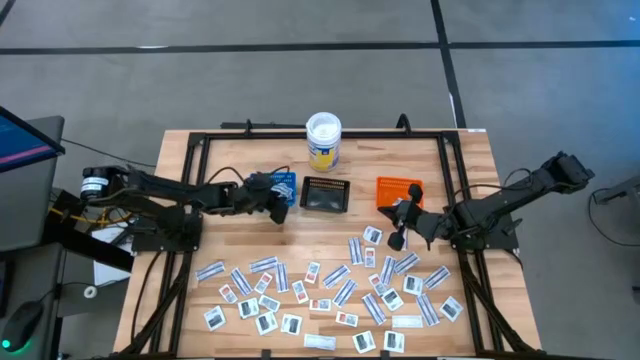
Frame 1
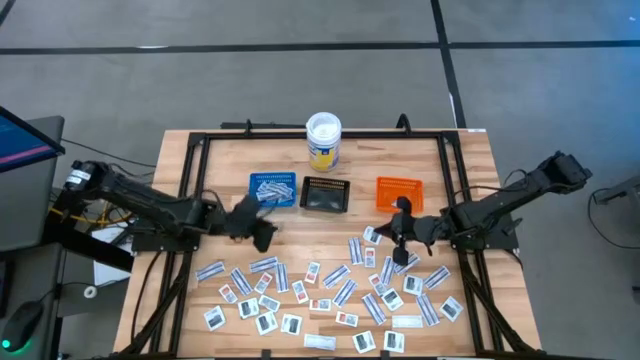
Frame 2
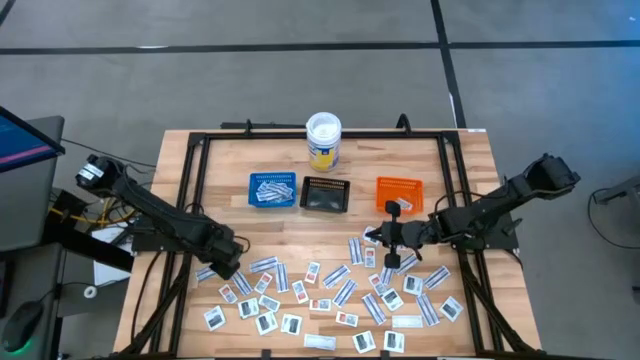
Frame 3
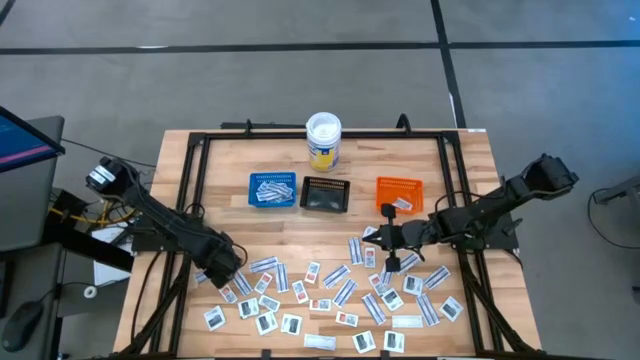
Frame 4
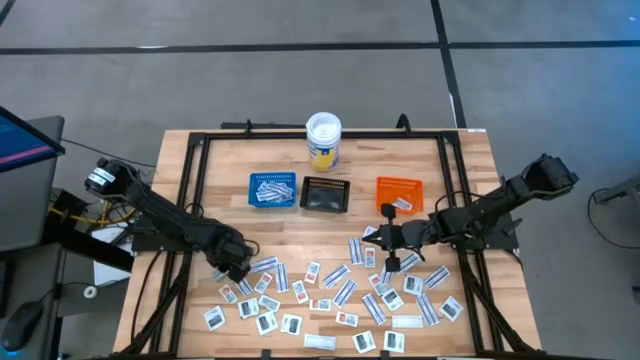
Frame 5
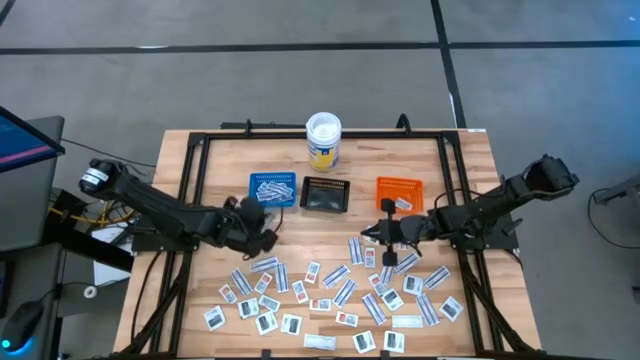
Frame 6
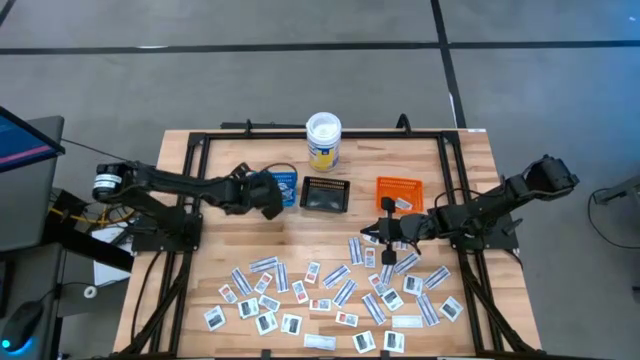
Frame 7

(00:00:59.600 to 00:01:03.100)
Task: Pick & Place First Aid Supplies
Put the blue bandage into the blue bin

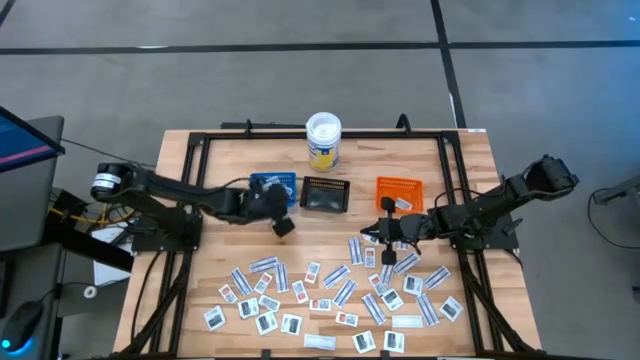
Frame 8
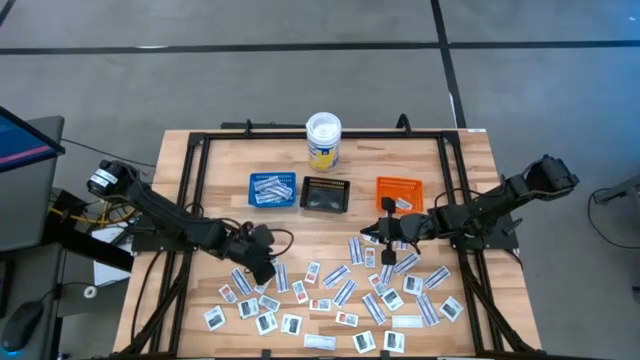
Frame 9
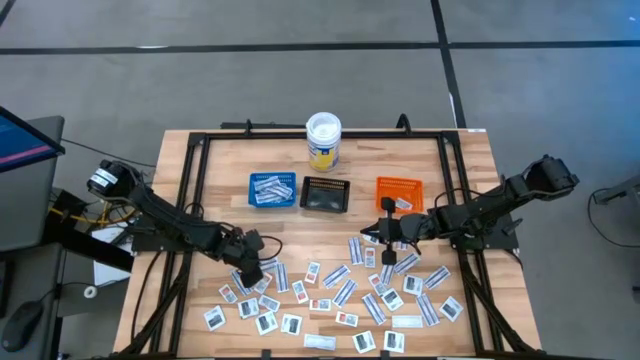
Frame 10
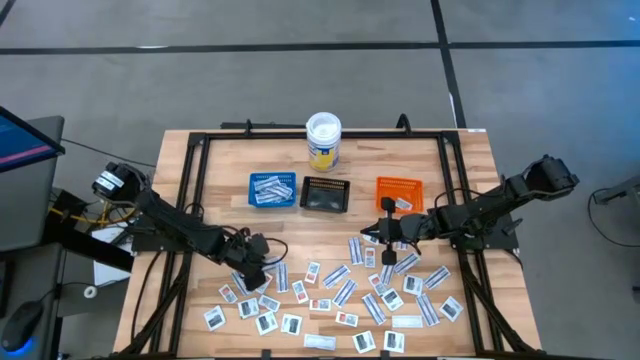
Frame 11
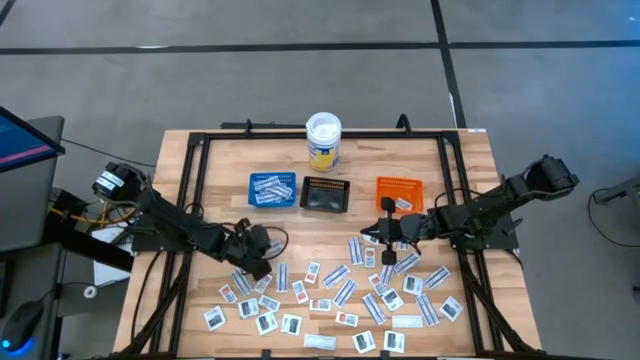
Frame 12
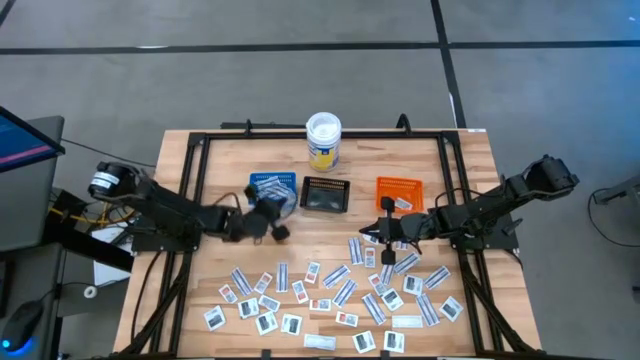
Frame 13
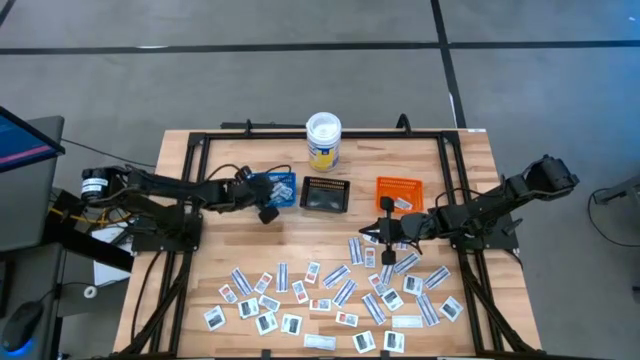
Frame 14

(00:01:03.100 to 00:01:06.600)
Put the blue bandage into the blue bin

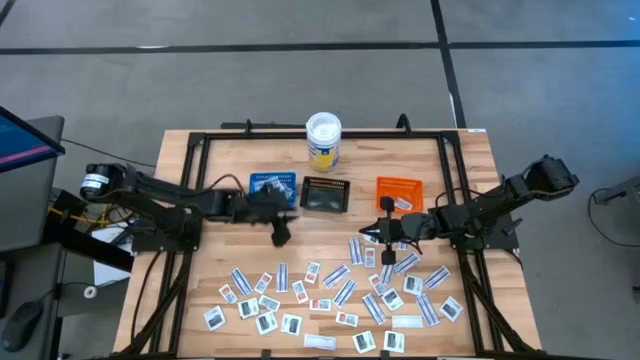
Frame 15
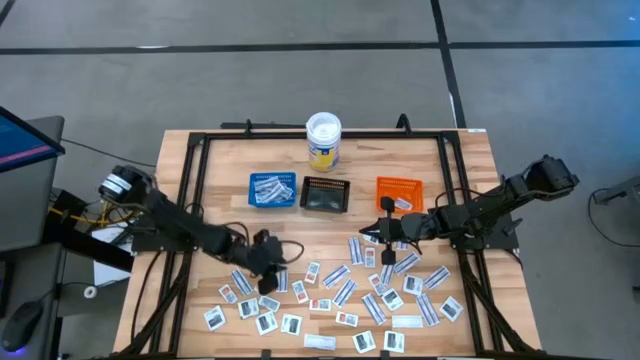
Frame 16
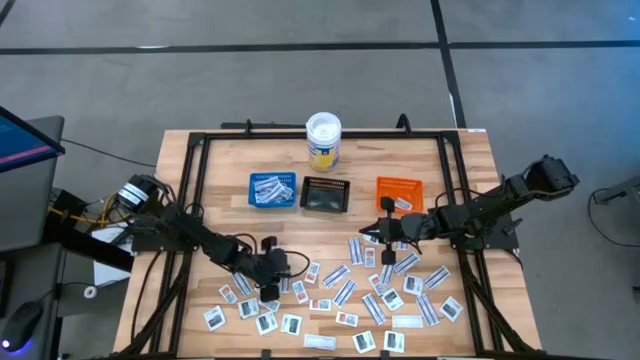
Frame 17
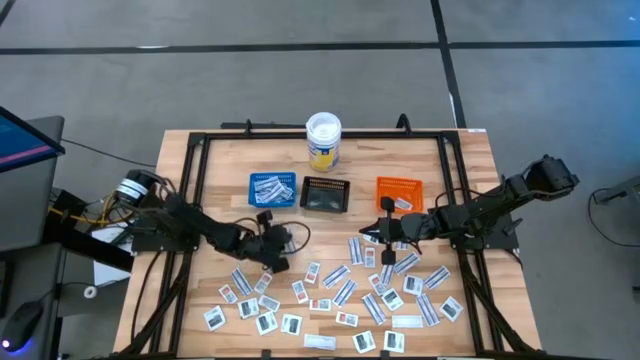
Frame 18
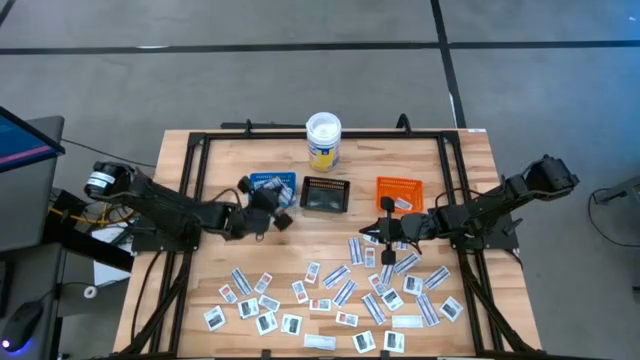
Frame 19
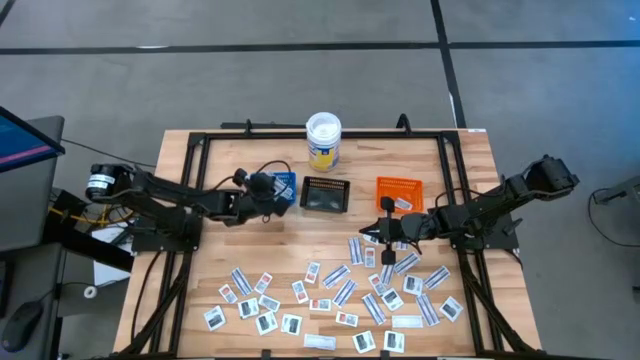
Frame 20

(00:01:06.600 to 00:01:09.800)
Put the blue bandage into the blue bin

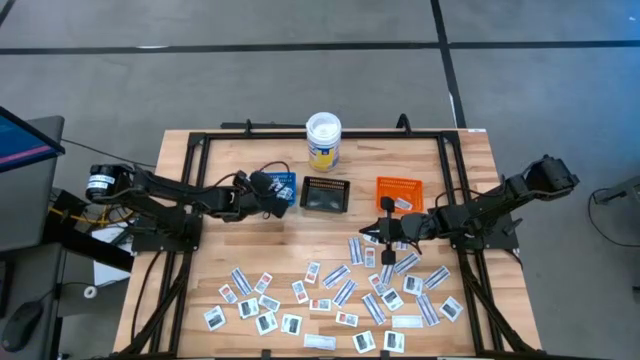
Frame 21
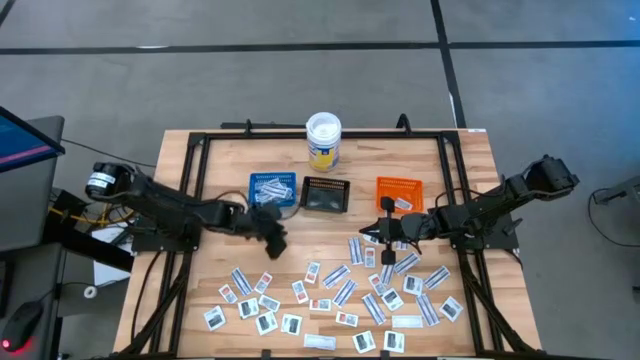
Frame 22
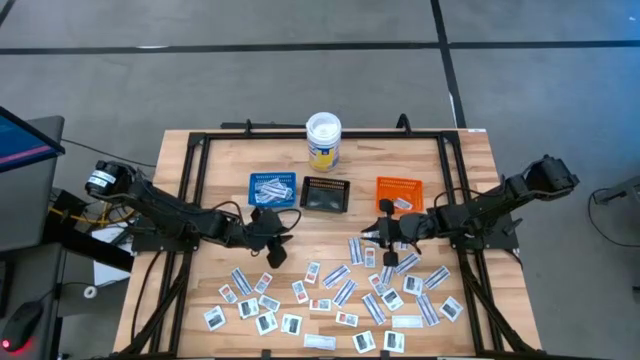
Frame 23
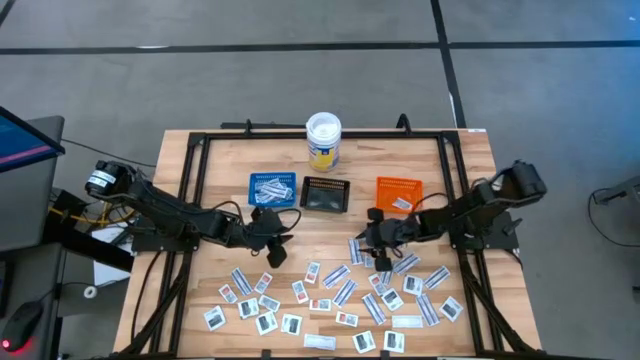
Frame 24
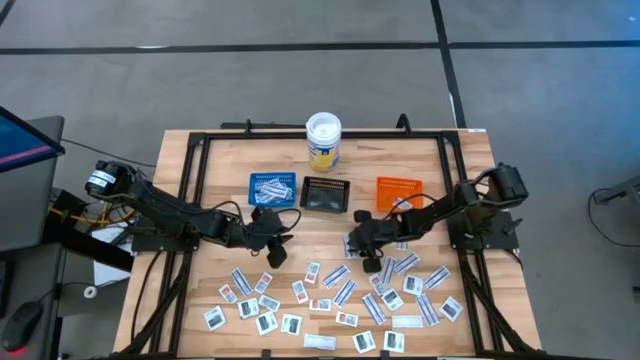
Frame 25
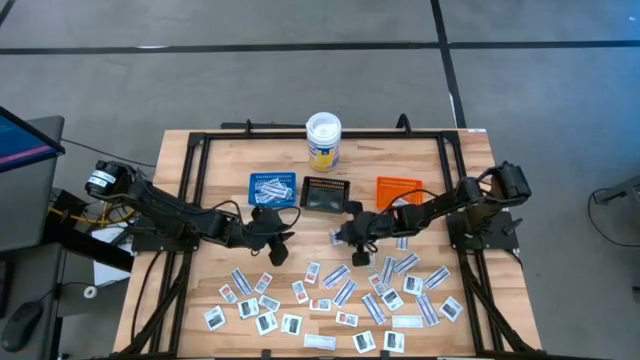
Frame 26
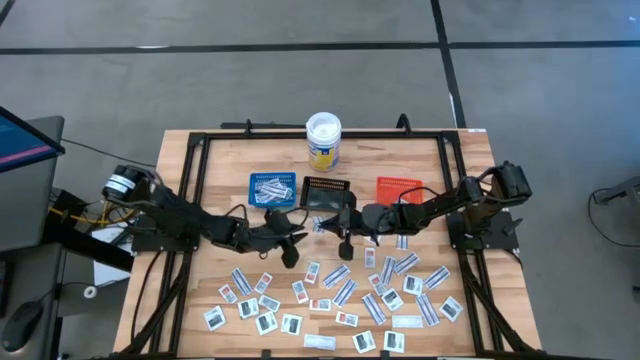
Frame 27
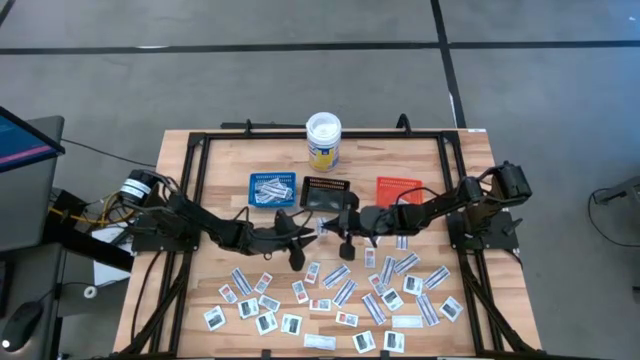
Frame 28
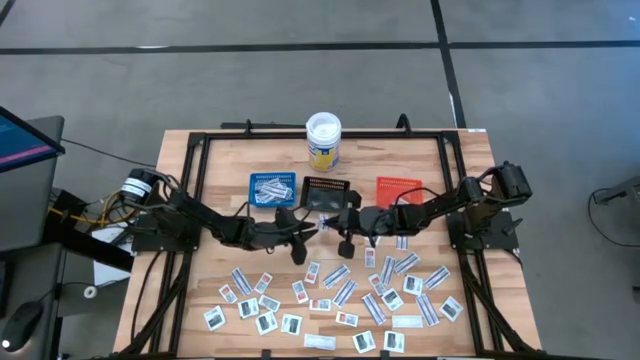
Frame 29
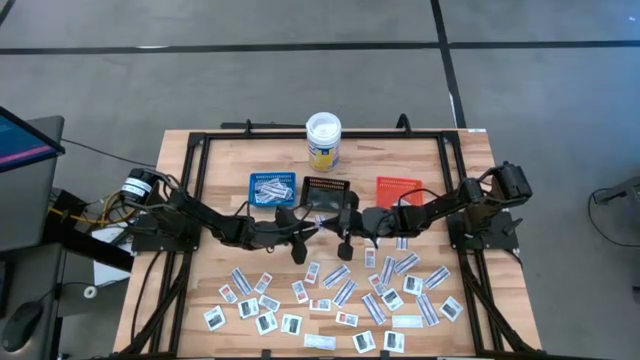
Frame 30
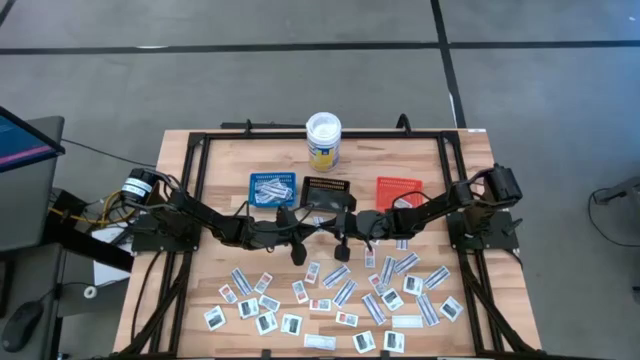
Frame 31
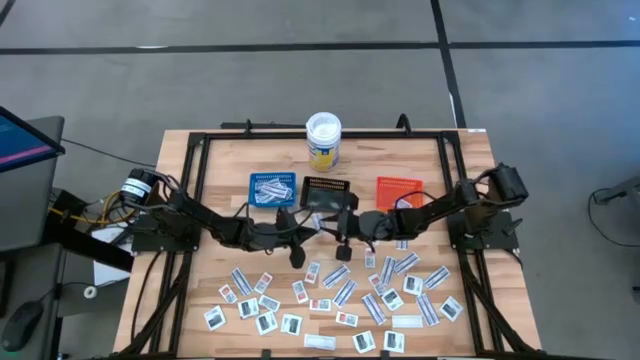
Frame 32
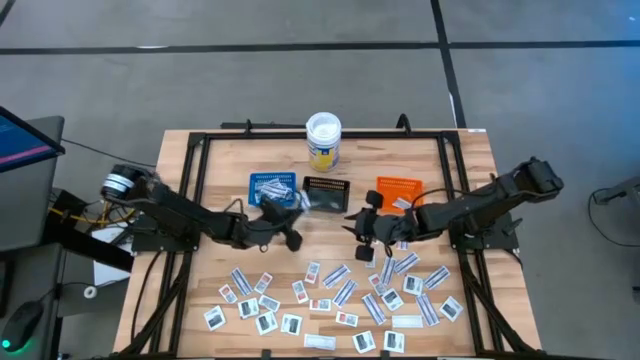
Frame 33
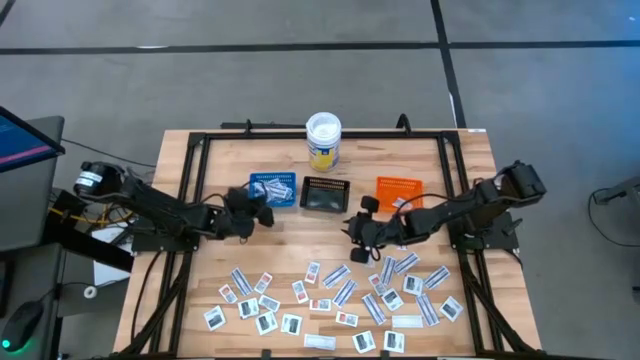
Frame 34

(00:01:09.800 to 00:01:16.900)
Put the blue bandage into the blue bin

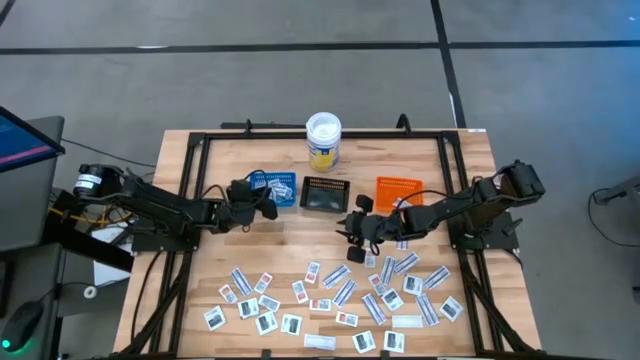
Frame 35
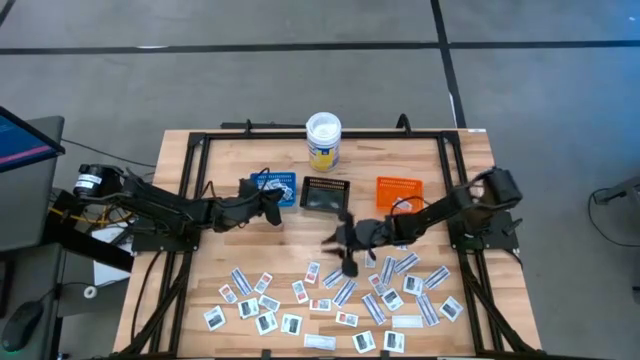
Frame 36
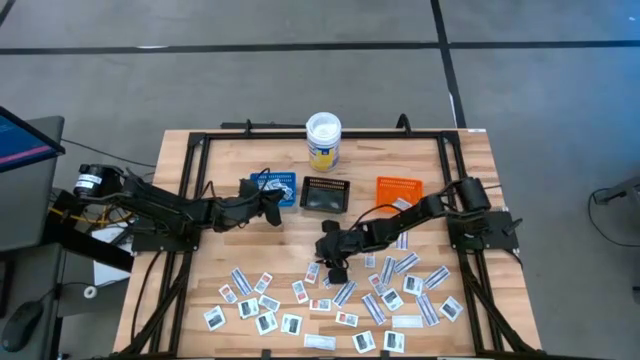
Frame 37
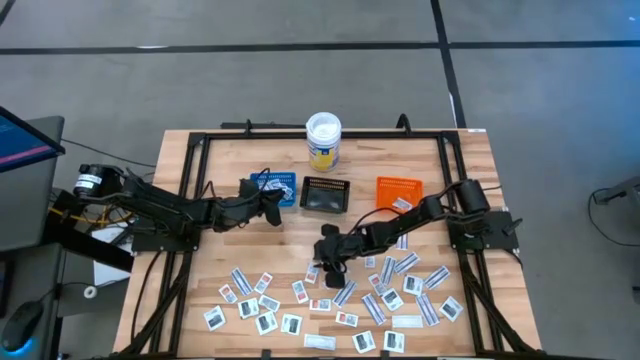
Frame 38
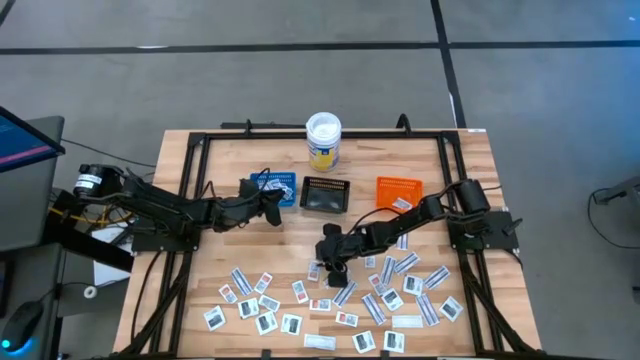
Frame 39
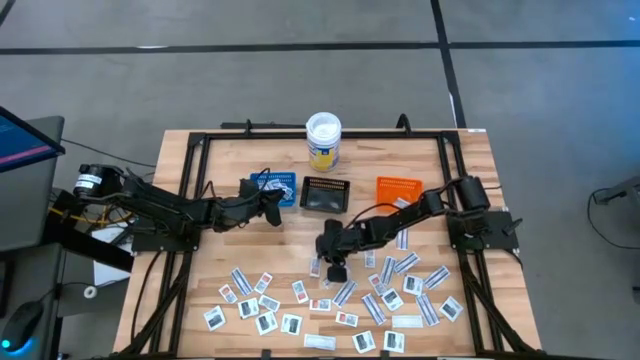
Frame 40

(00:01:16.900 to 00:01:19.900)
Put the orange ointment pack into the orange bin

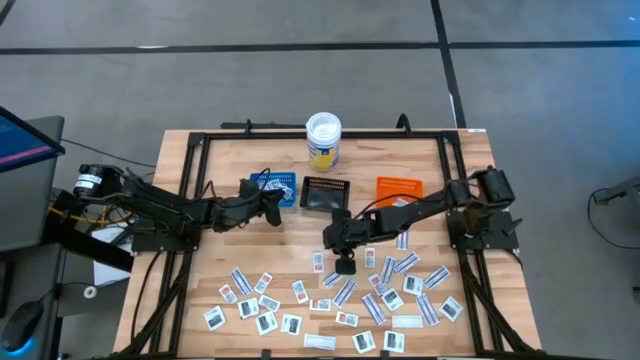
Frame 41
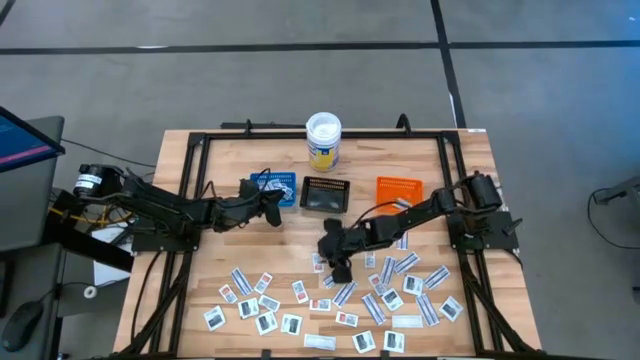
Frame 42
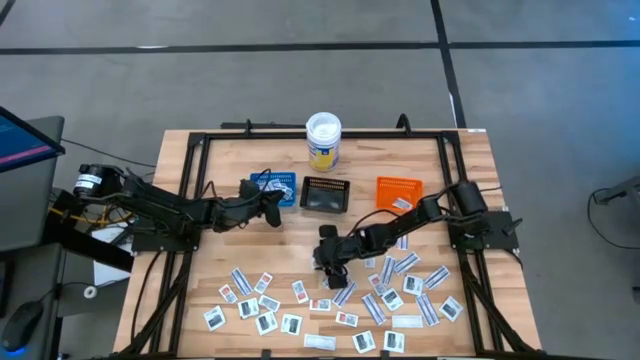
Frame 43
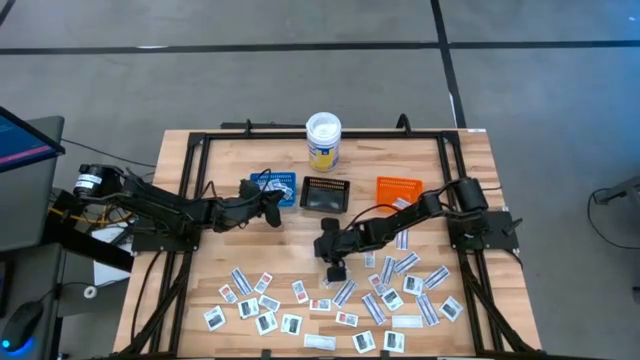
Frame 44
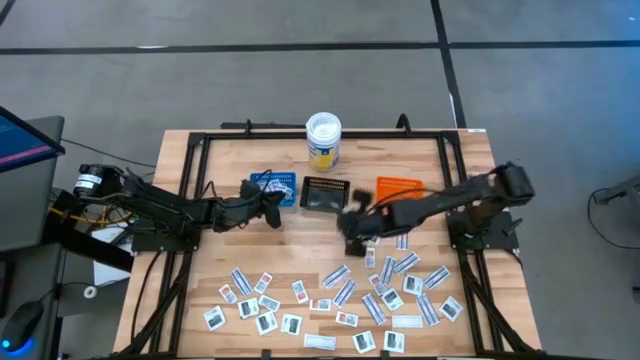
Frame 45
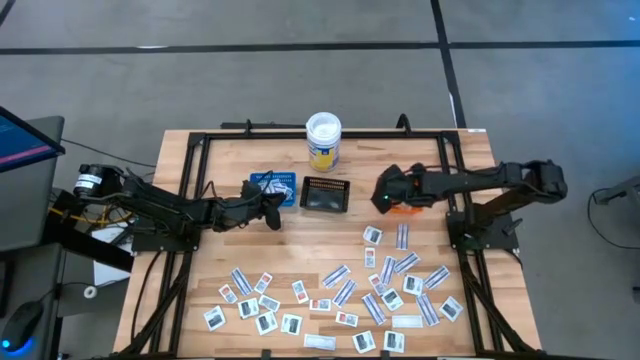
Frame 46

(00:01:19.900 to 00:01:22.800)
Put the orange ointment pack into the orange bin
